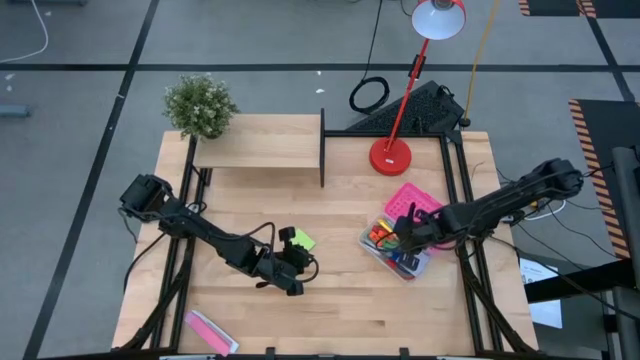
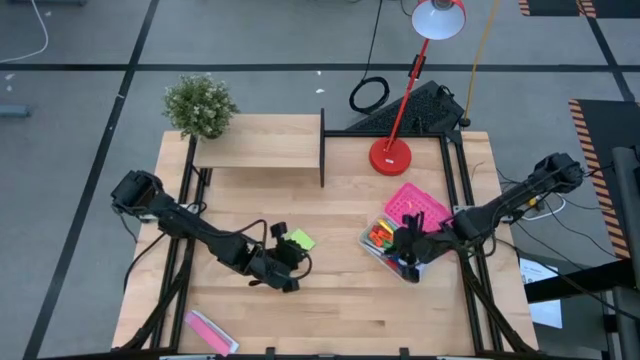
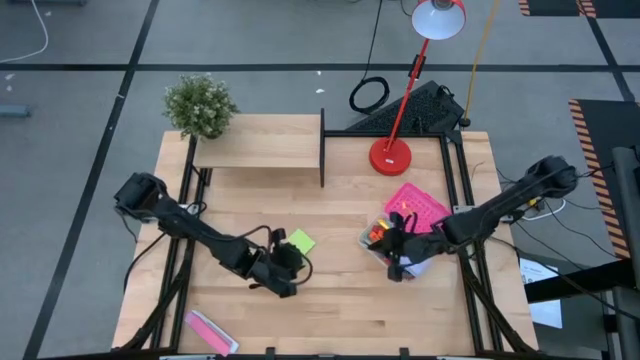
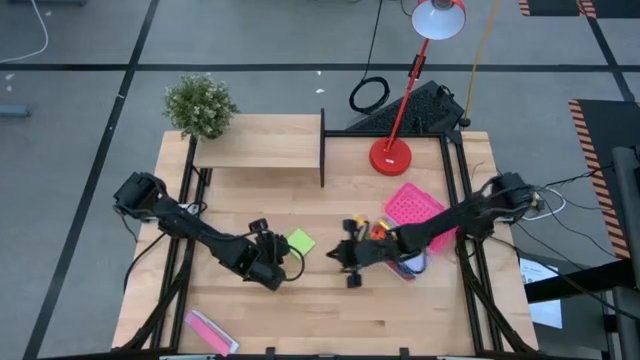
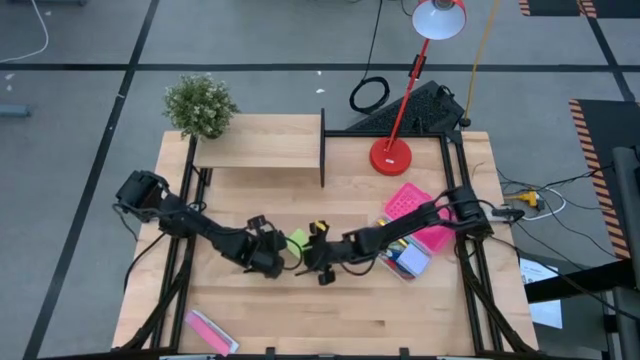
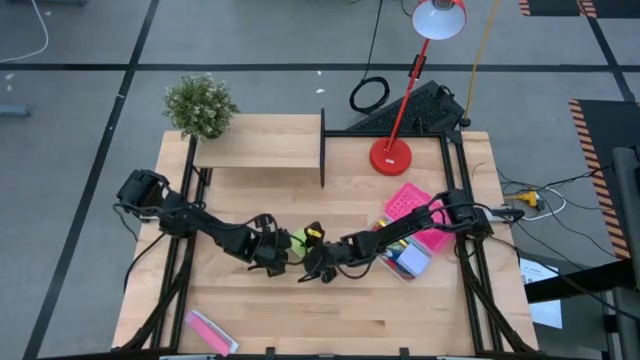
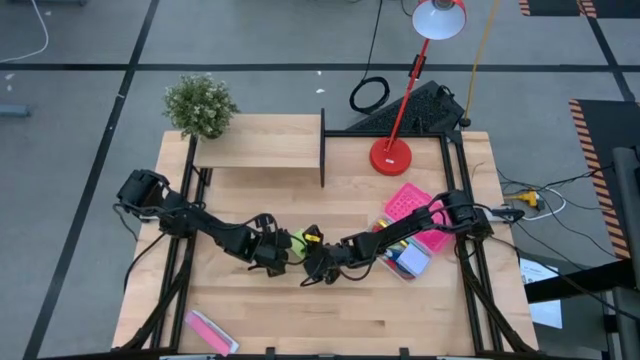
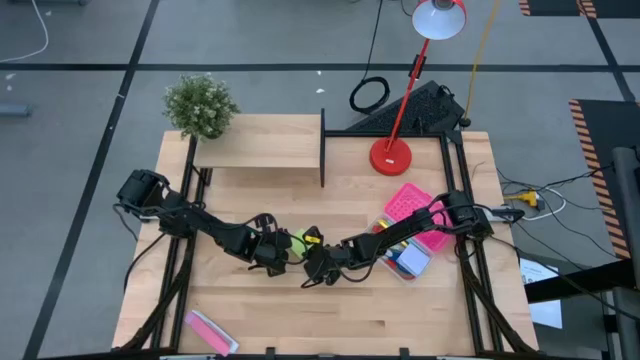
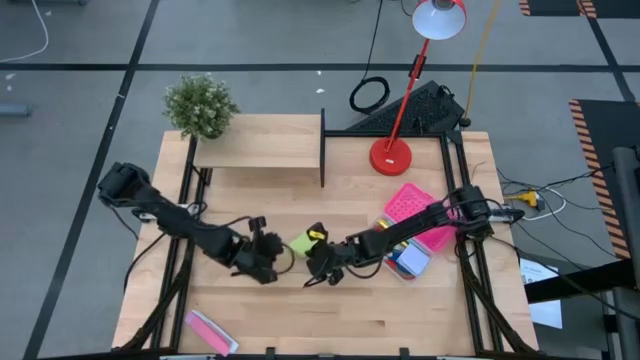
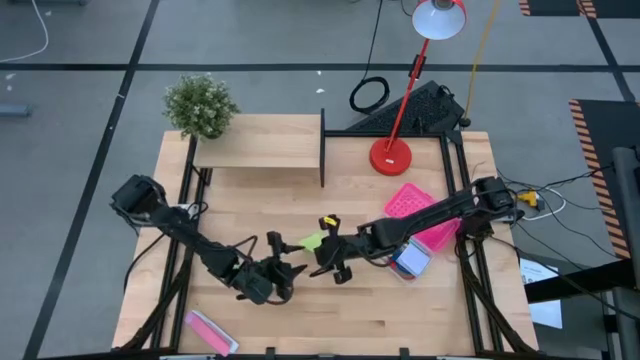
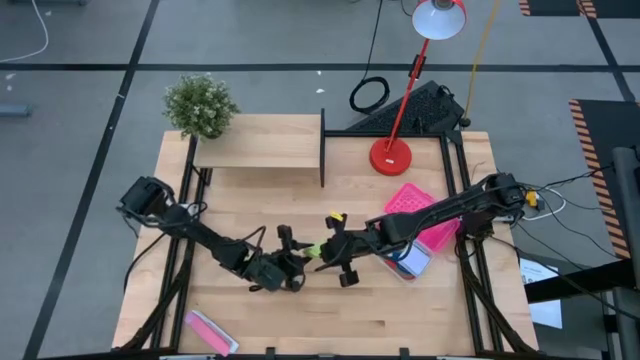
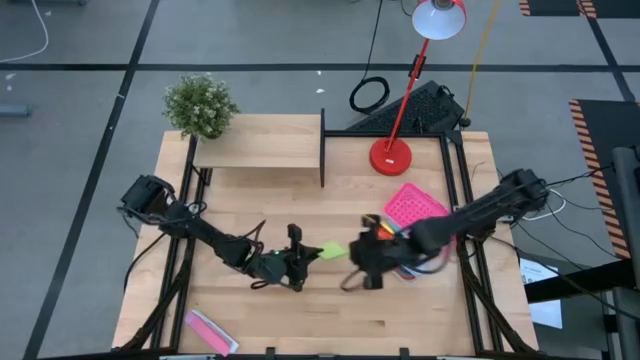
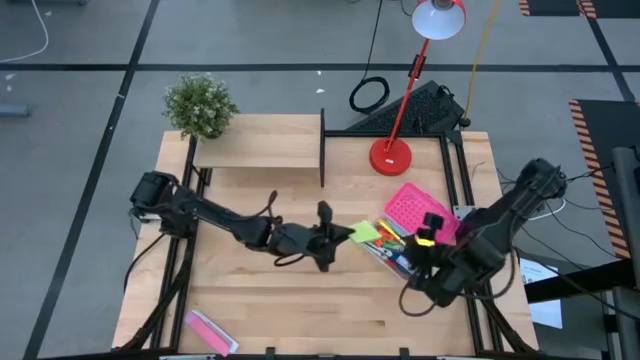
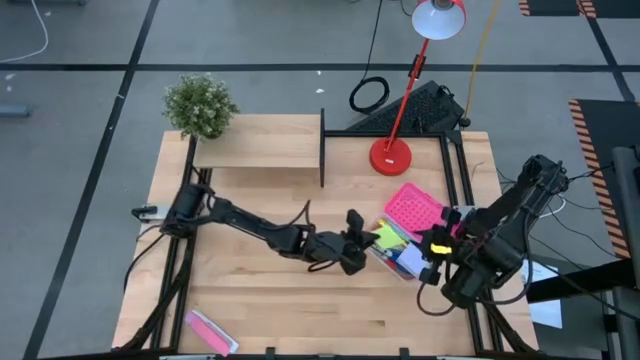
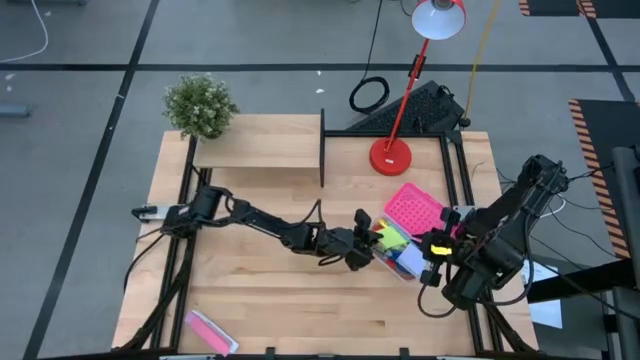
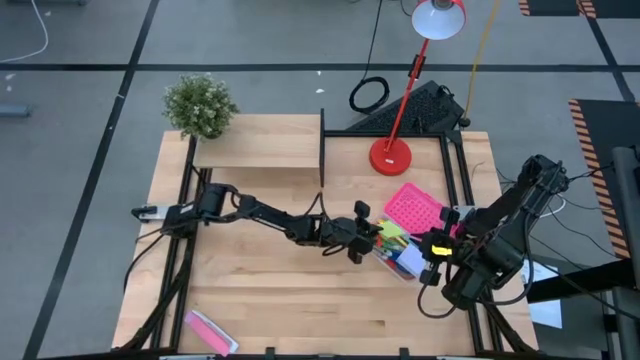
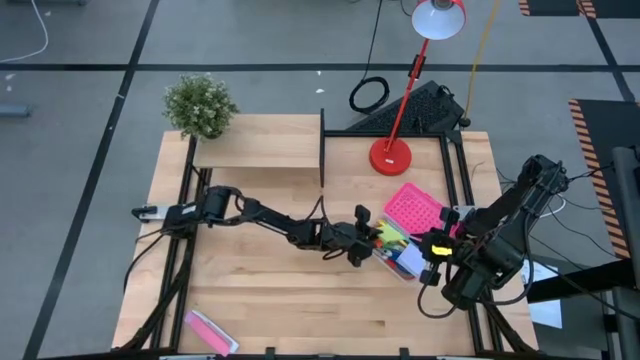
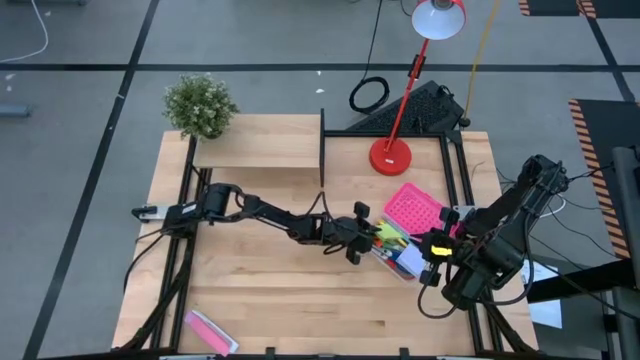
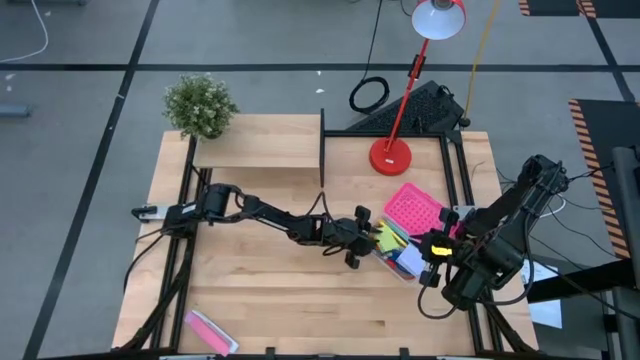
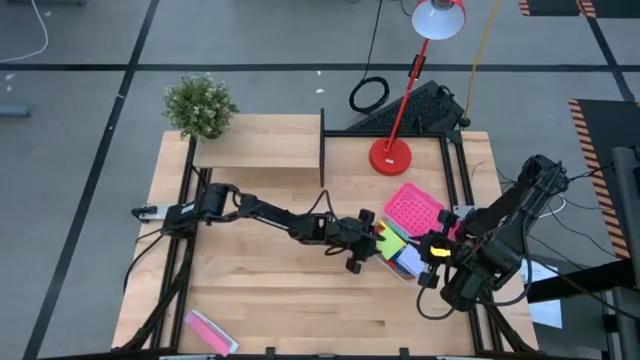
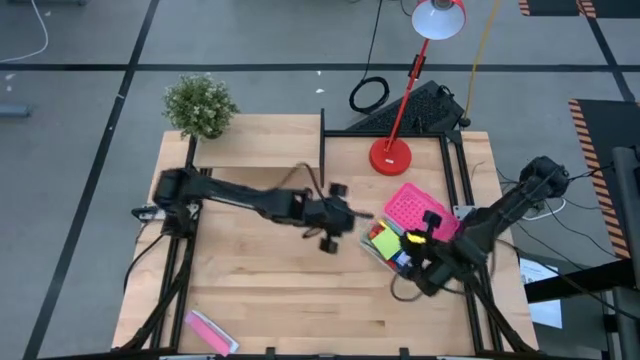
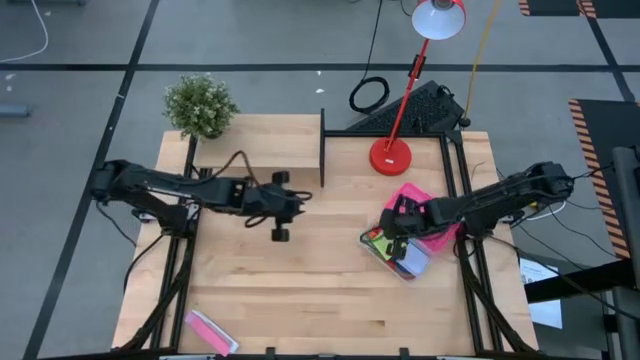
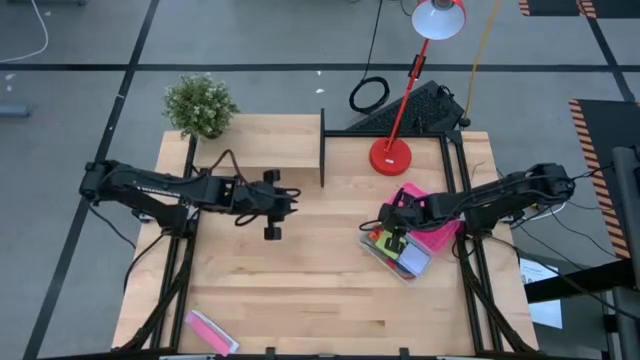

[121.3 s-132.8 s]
Task: Pack school essentials
Put the green sticky notes into the pink supply box

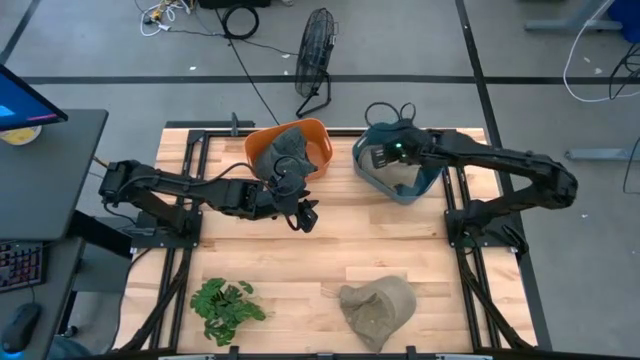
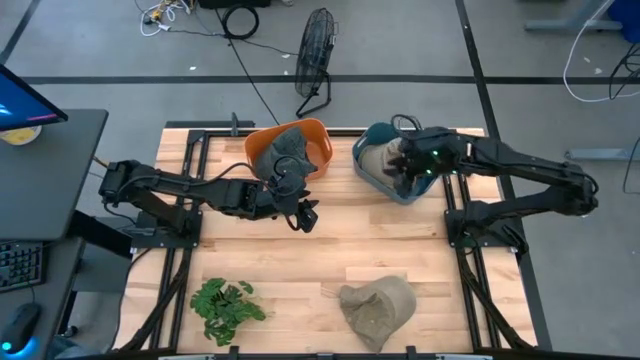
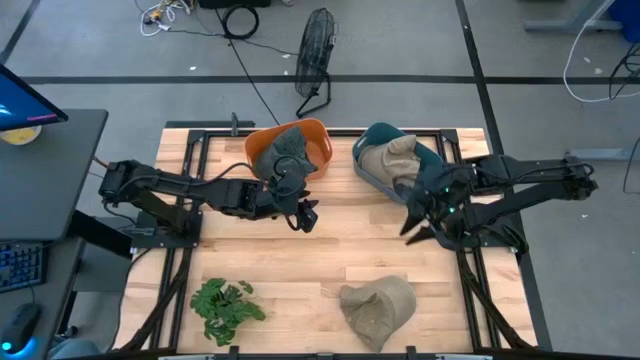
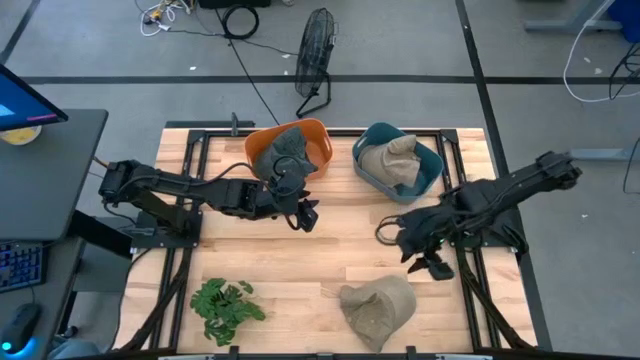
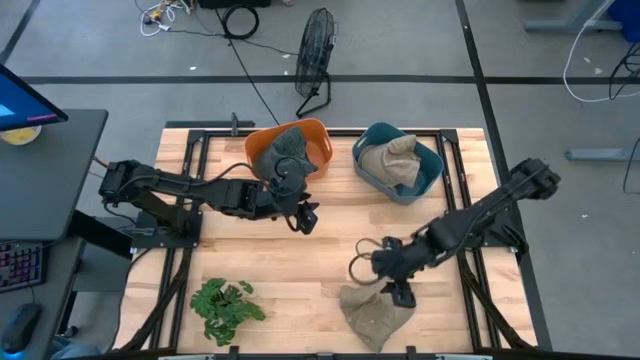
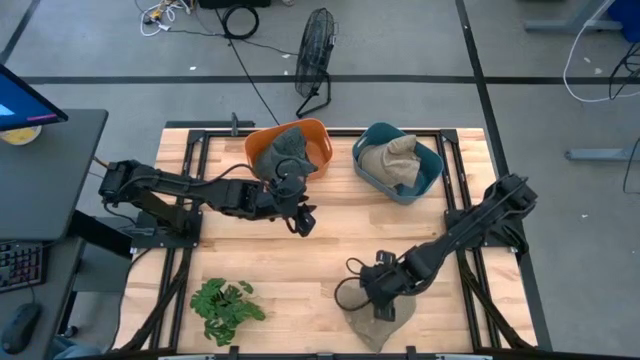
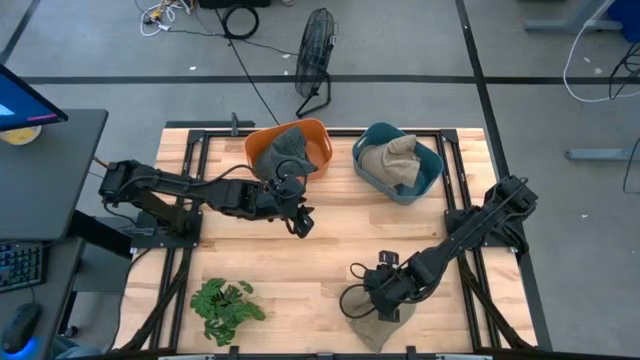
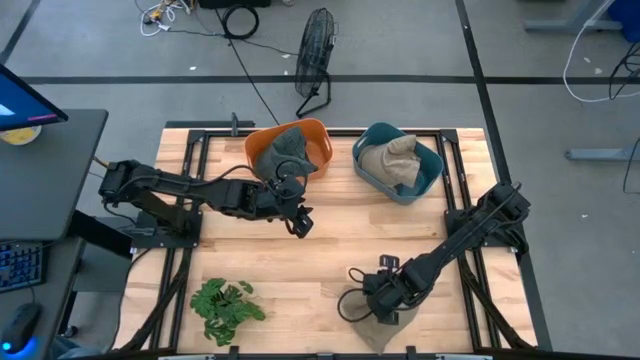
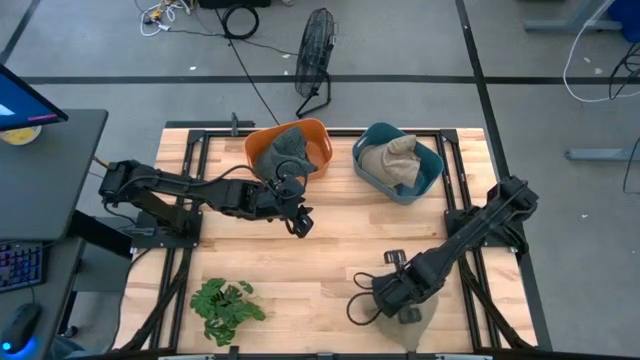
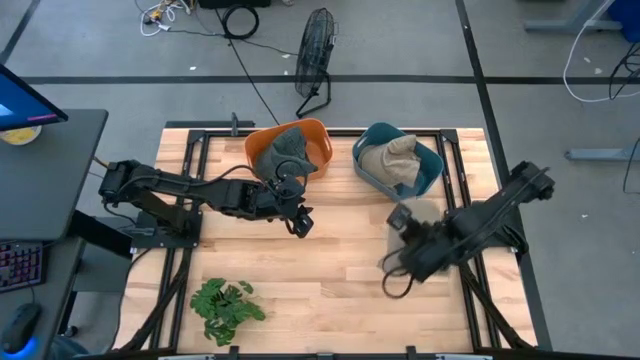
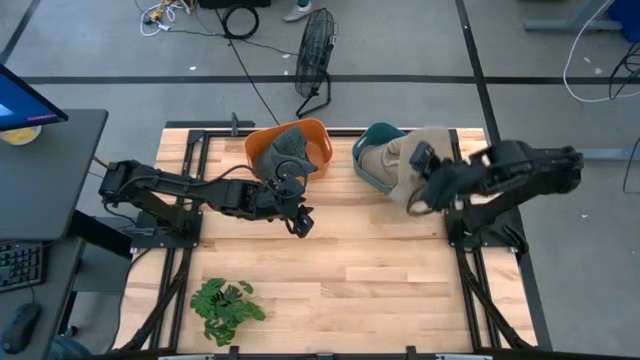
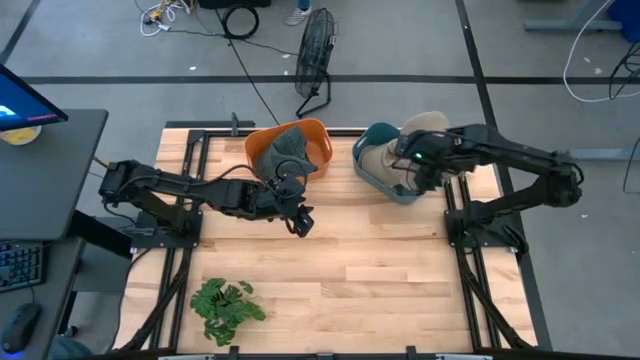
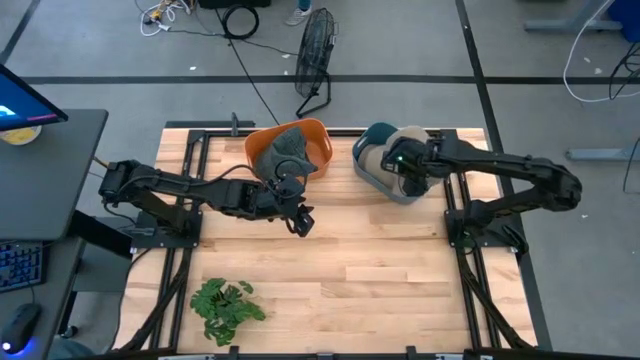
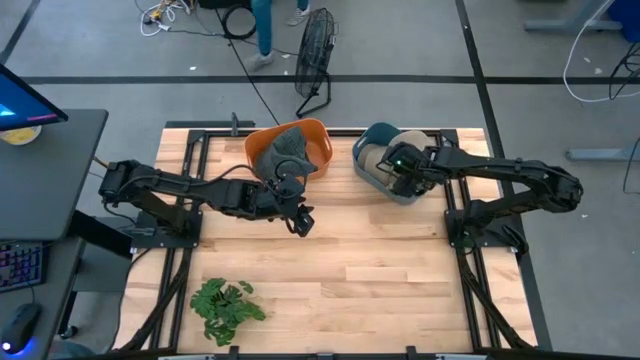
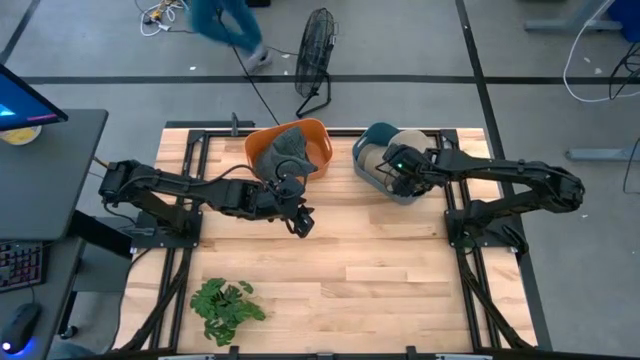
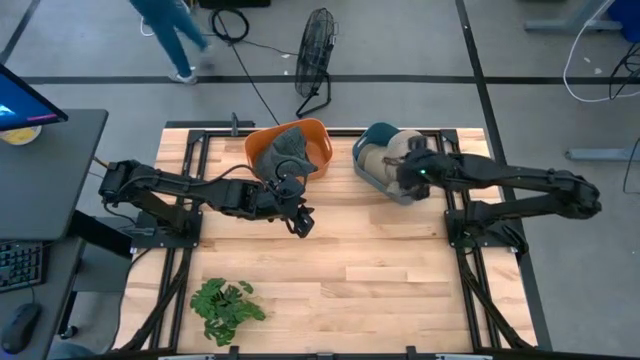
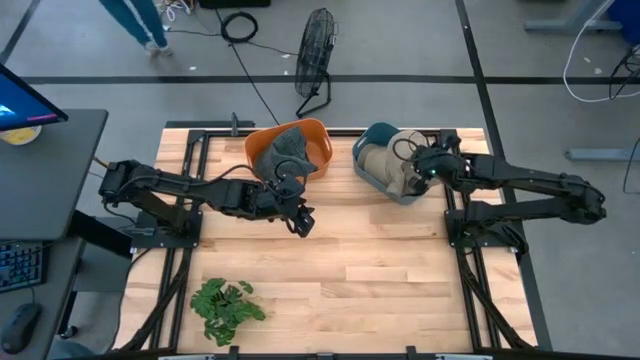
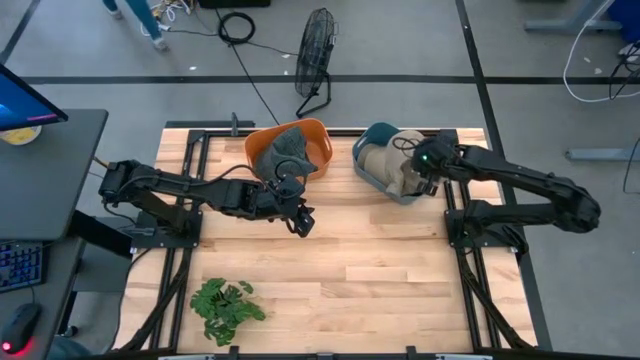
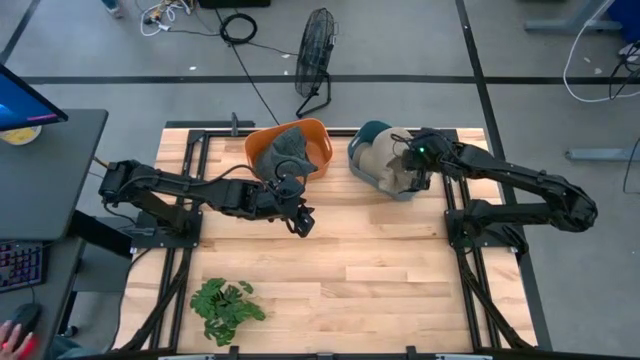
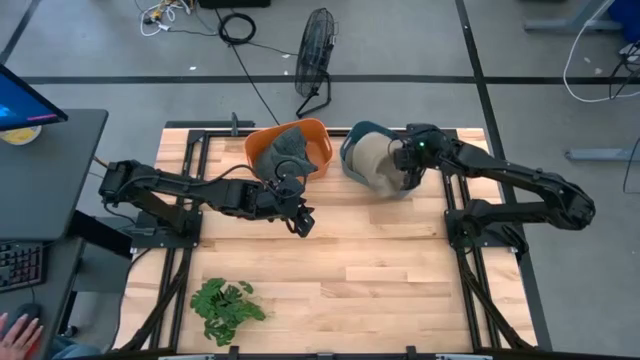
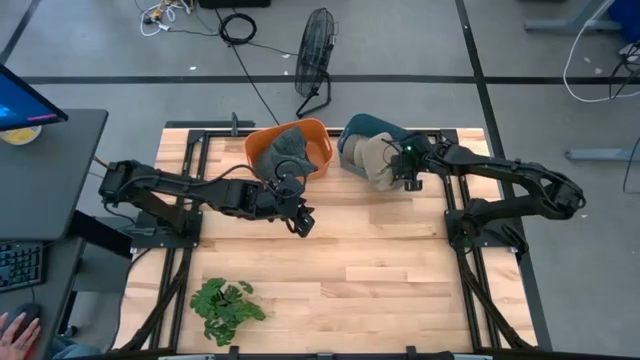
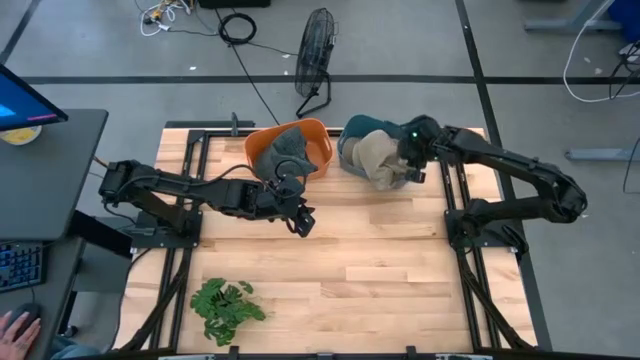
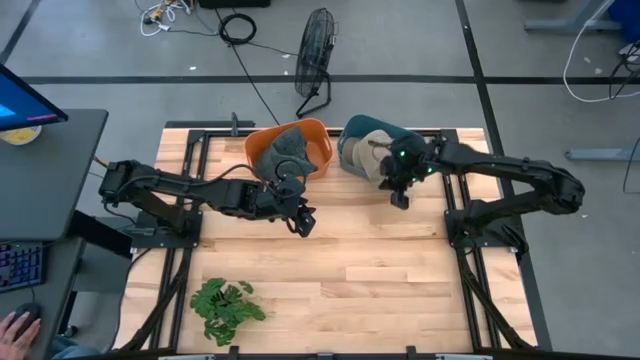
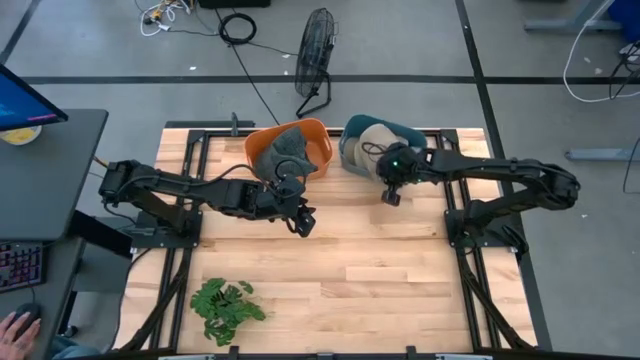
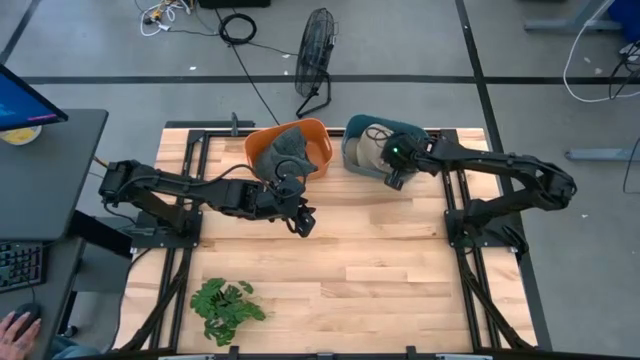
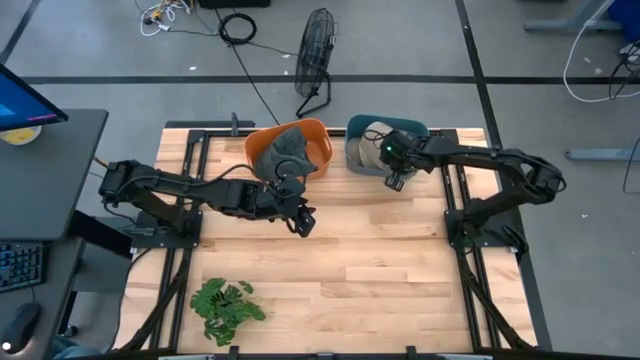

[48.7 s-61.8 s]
Task: Pick & Place hat
Put the brown cap into the blue bin
